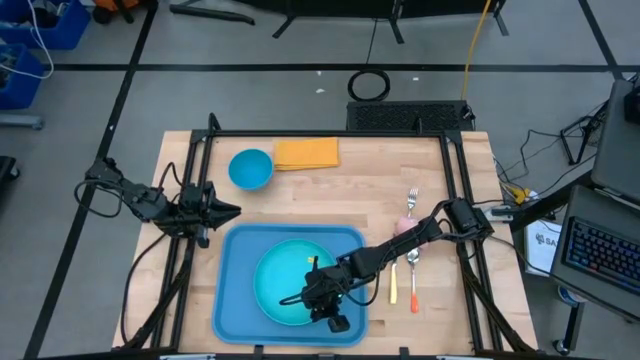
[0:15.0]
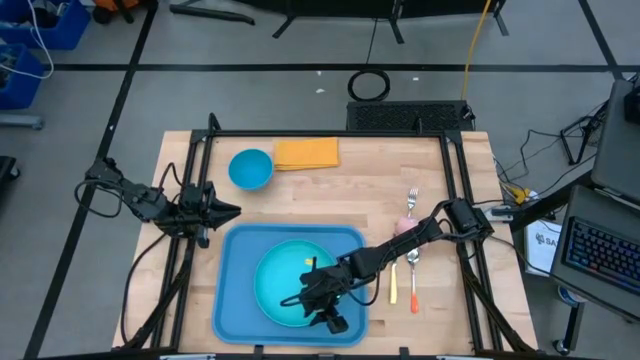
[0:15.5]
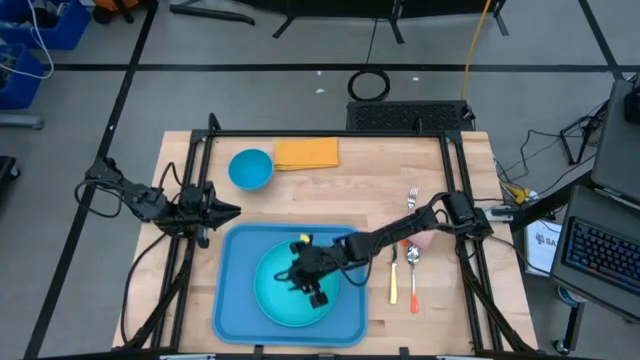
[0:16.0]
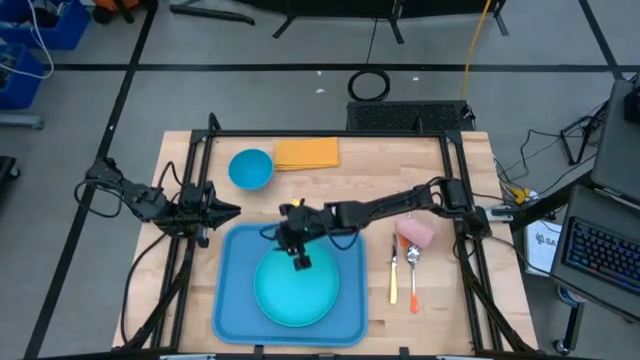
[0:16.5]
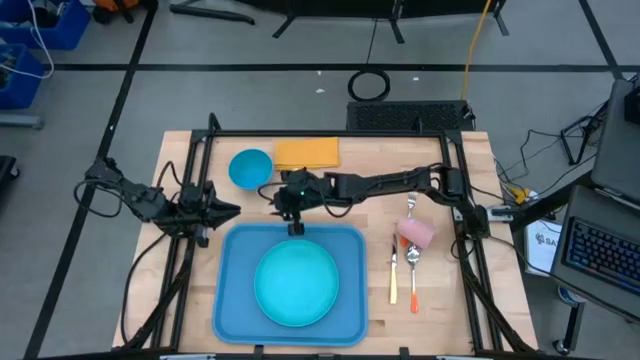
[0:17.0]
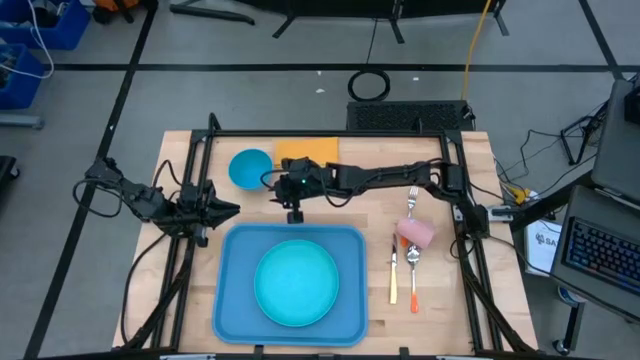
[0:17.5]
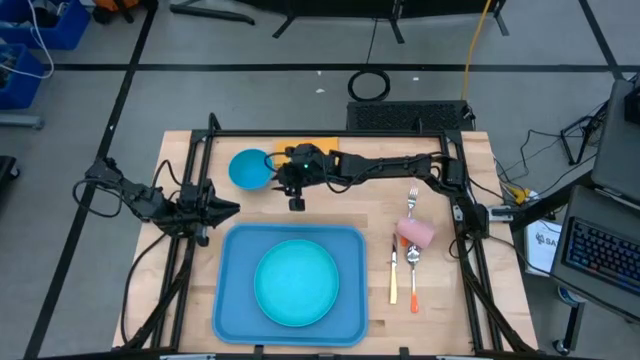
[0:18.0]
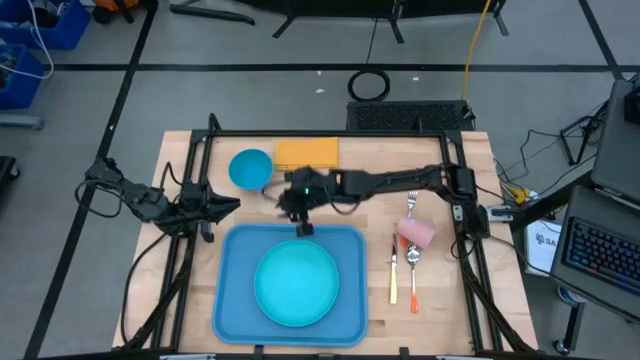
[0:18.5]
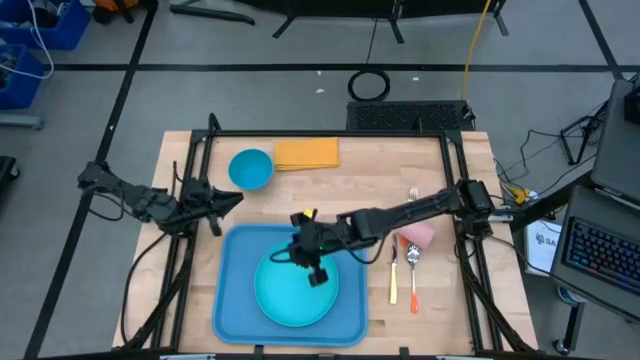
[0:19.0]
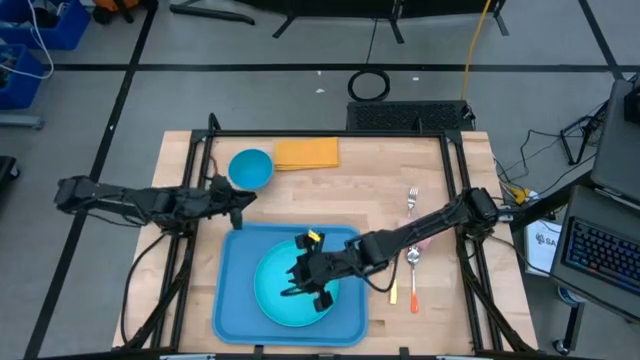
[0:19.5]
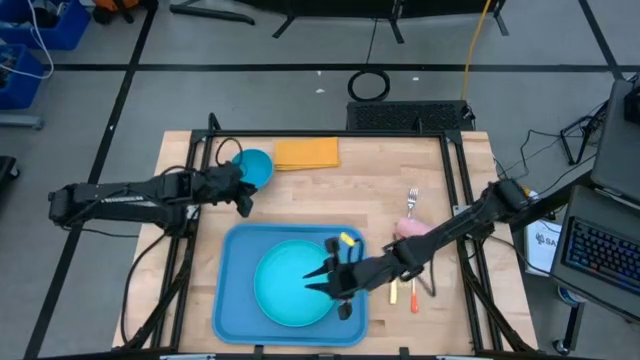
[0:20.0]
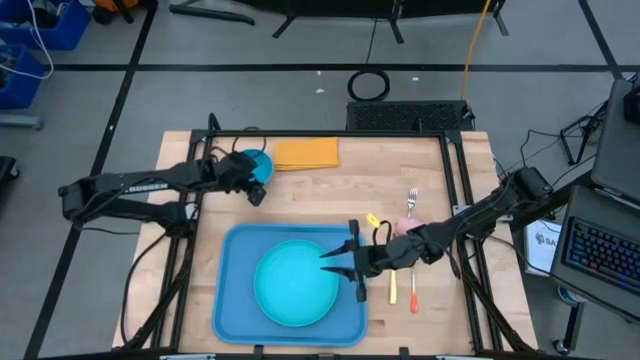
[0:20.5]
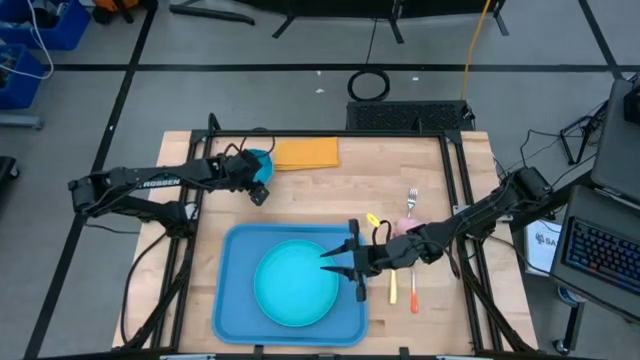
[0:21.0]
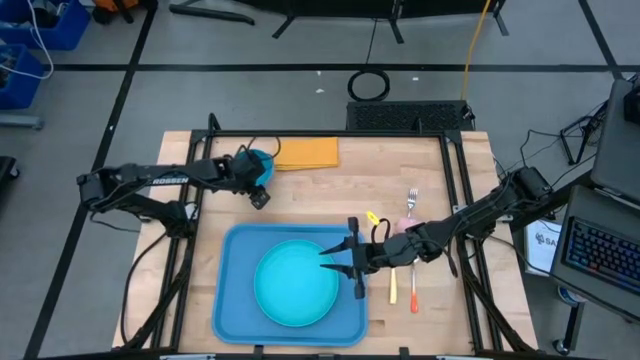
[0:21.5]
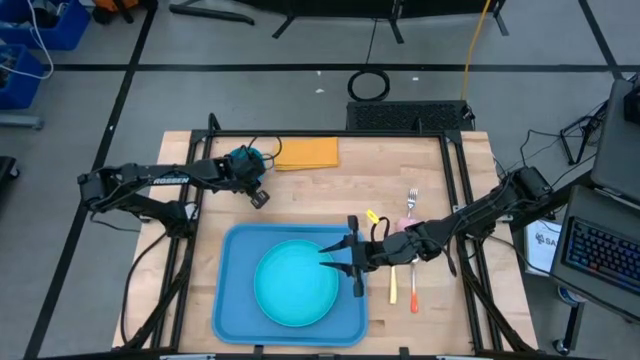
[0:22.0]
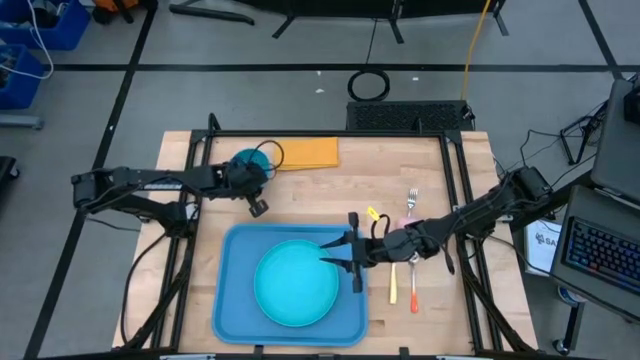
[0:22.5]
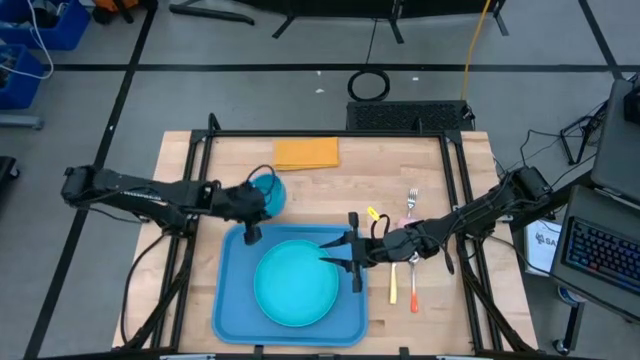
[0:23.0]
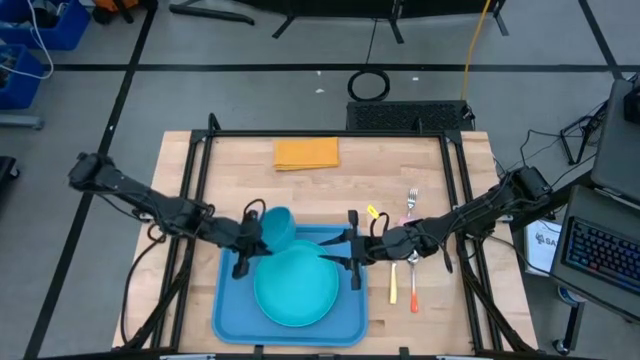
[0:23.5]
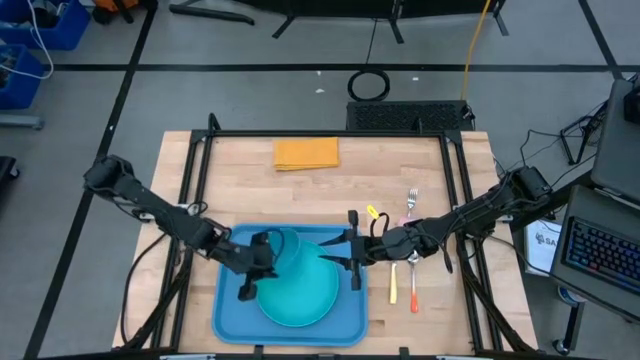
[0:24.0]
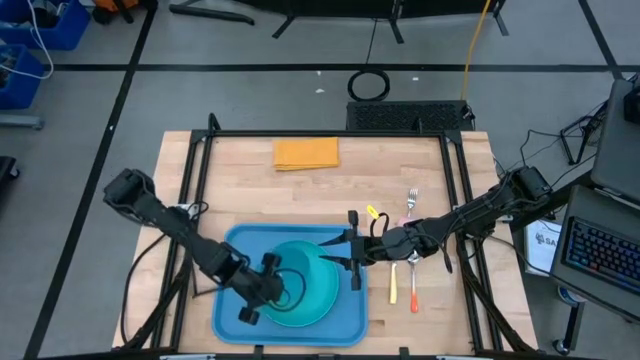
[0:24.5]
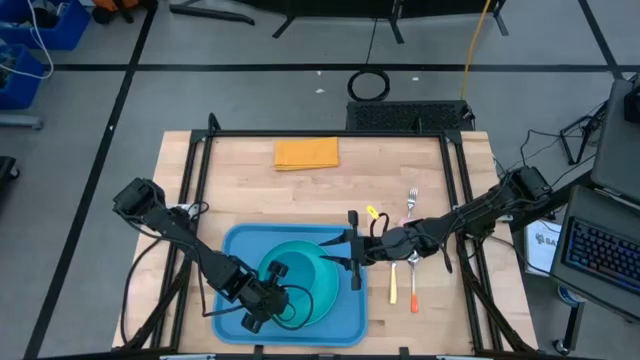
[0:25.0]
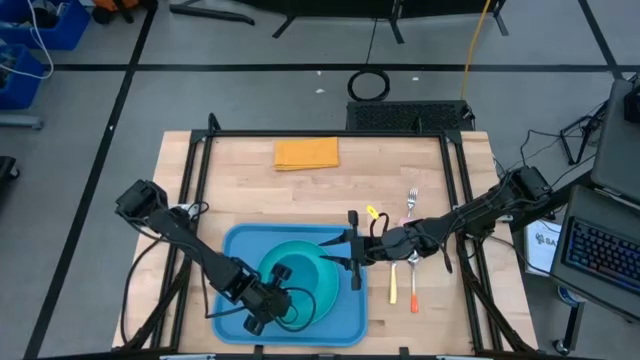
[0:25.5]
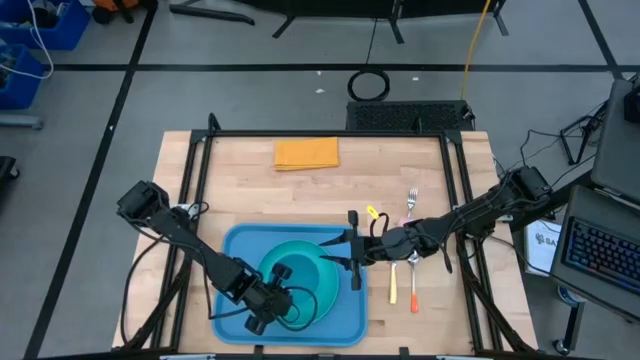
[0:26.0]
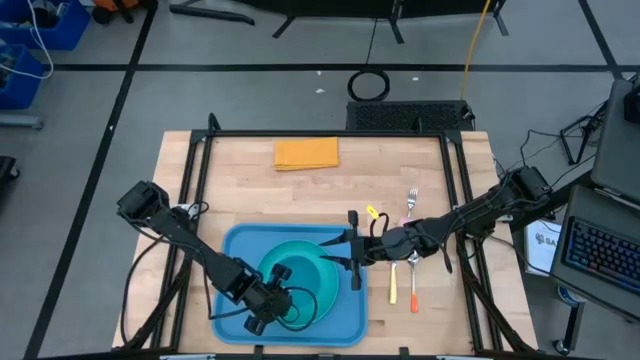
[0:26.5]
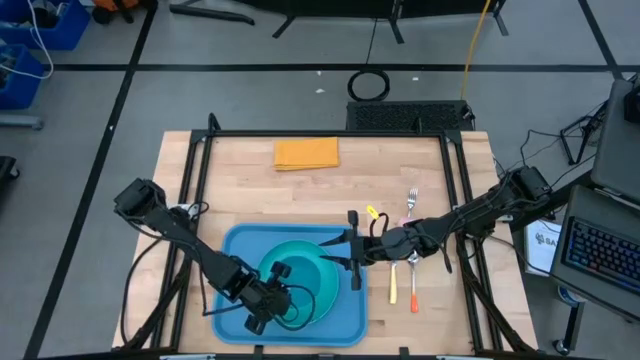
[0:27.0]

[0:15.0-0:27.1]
Task: Set up tray
Put the blue bowl on the green plate in the blue tray

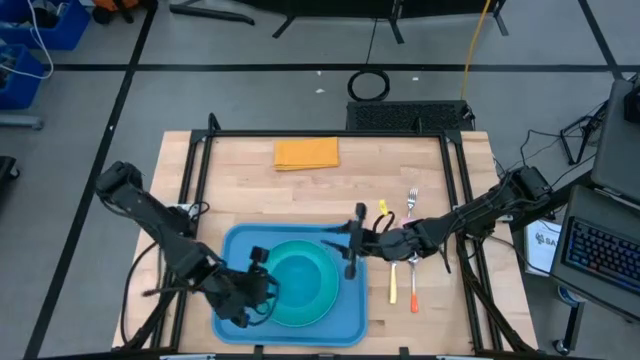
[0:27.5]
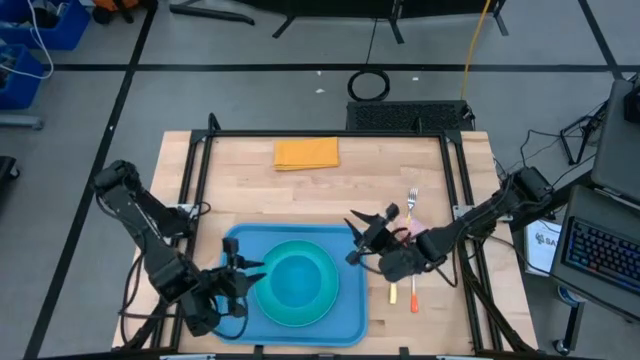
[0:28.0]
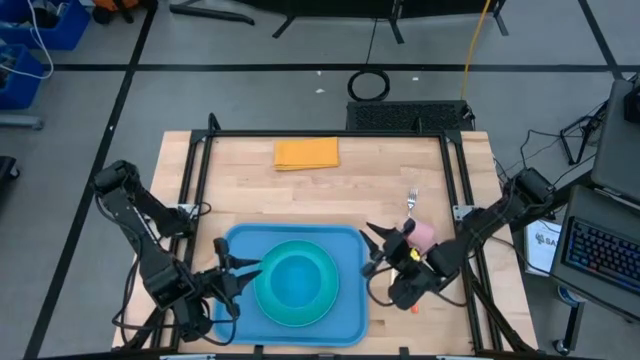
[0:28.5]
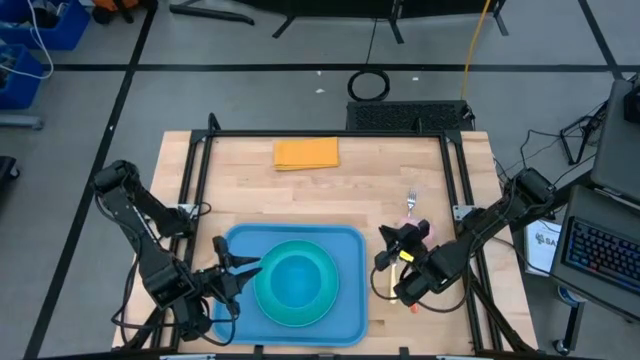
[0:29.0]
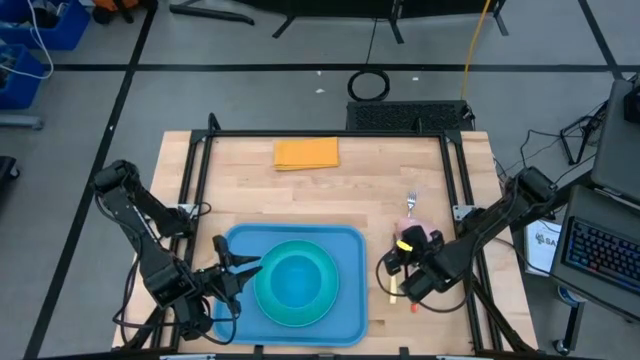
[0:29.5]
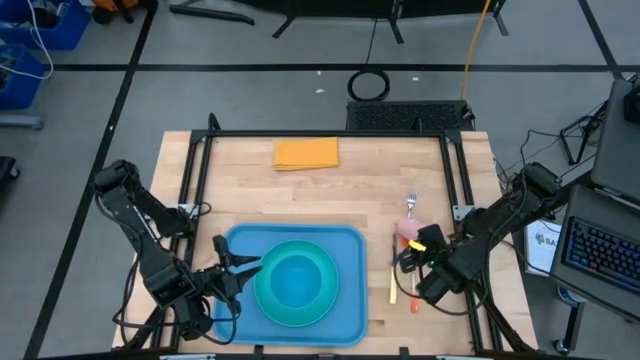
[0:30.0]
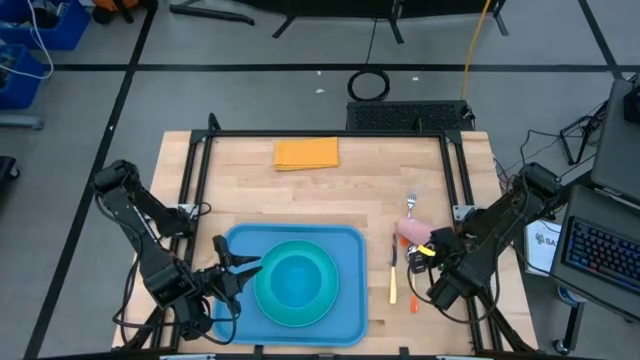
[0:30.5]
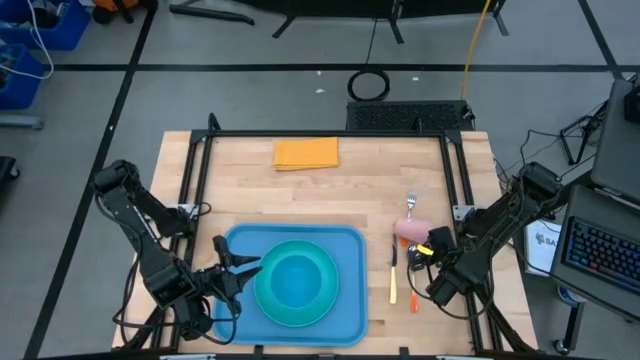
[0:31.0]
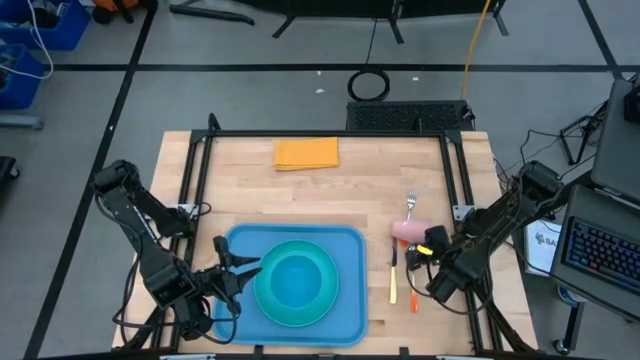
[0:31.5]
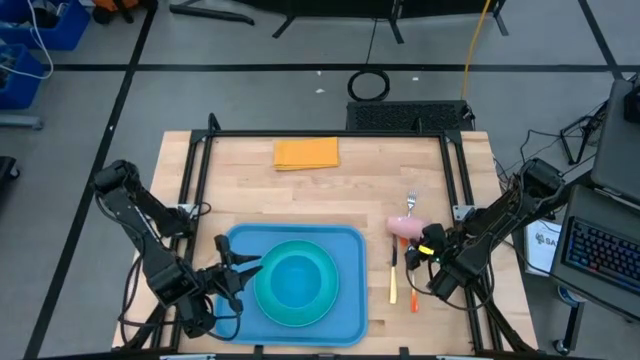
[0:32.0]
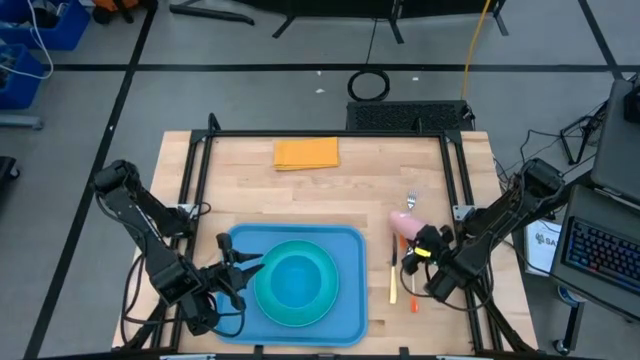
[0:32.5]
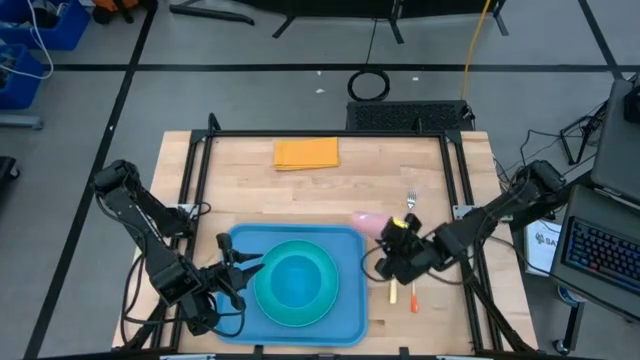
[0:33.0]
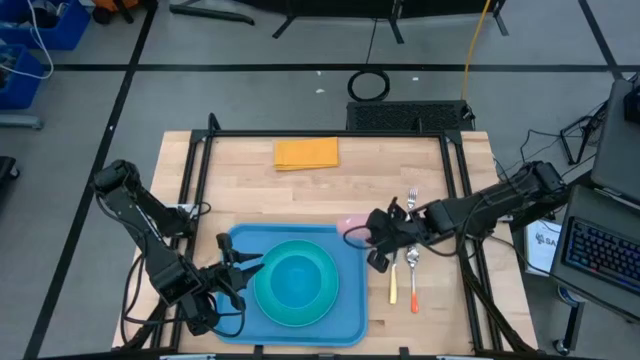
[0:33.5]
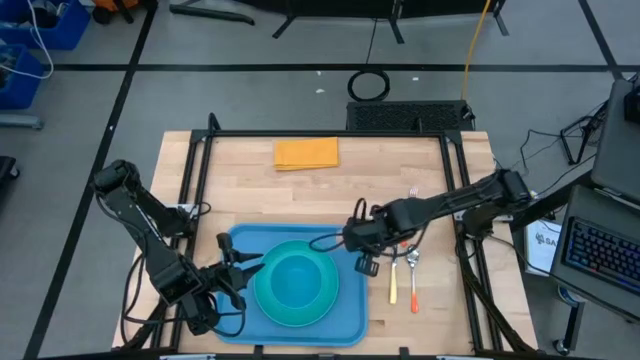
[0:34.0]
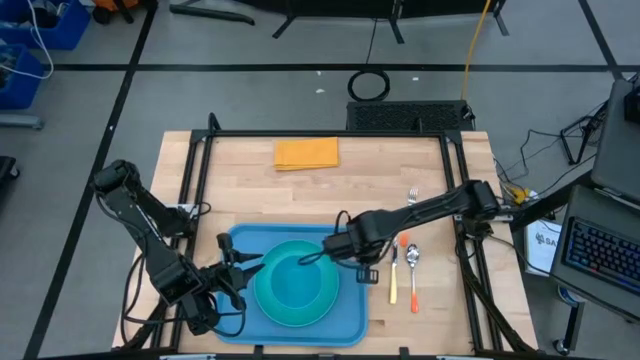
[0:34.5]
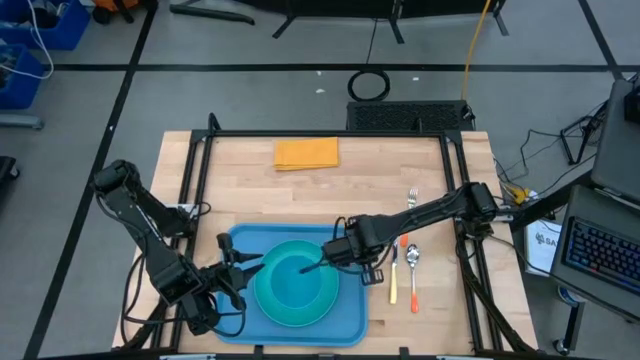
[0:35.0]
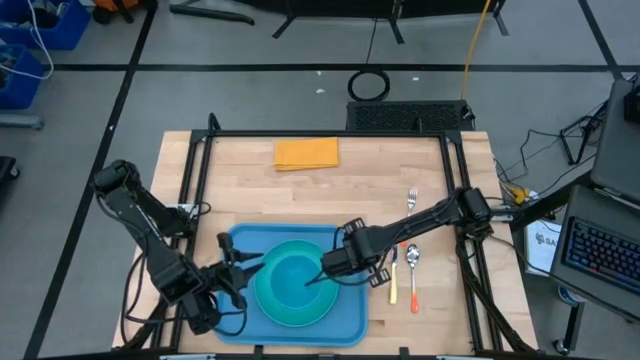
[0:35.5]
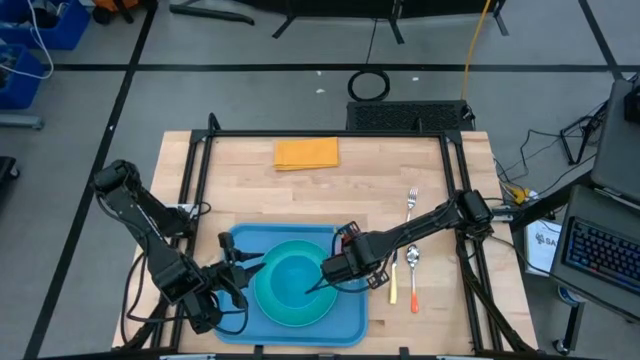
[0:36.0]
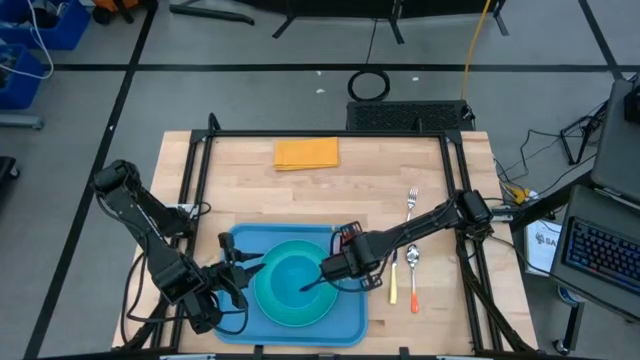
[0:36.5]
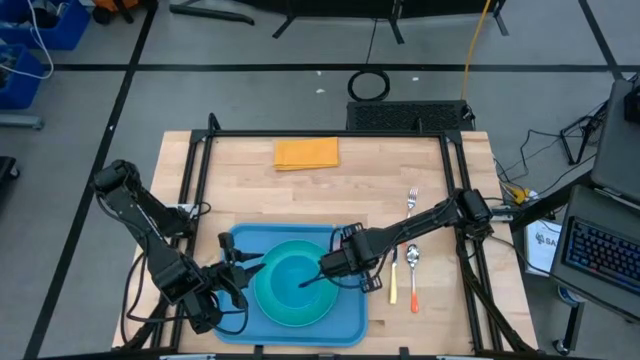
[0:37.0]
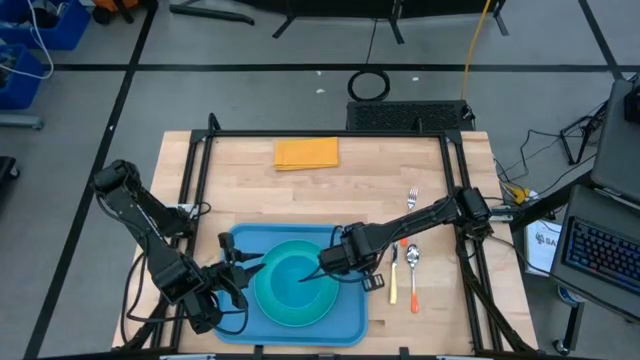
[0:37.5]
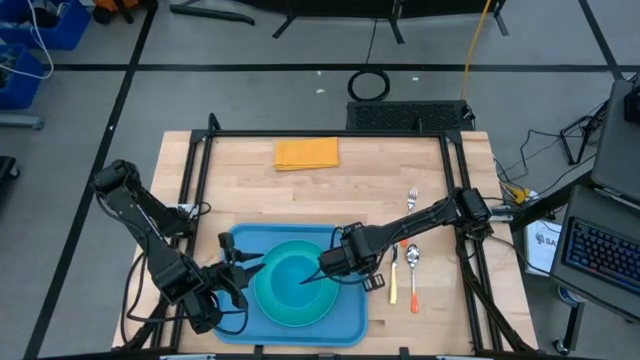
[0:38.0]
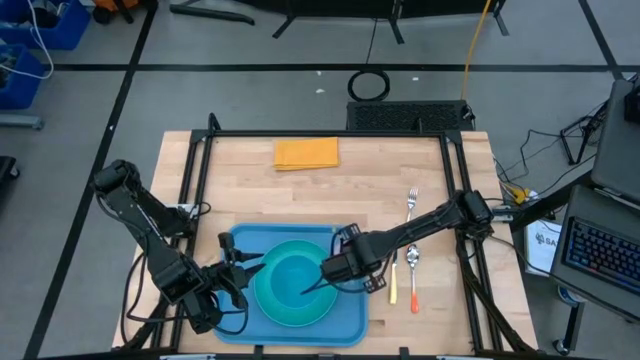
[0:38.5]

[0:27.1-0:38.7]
Put the pink cup on the top right of the blue tray
